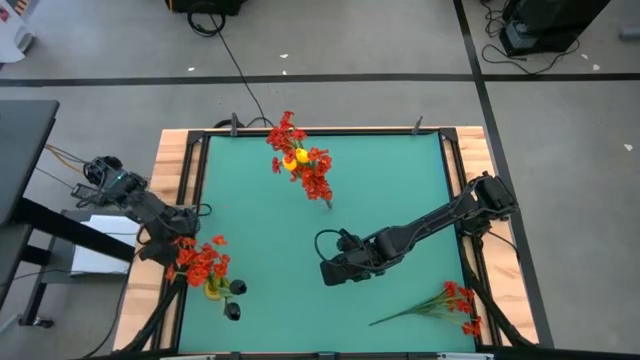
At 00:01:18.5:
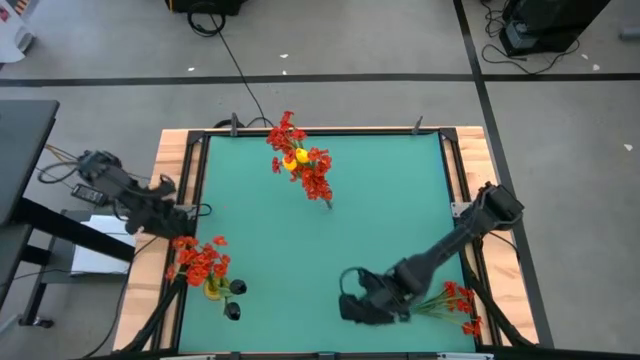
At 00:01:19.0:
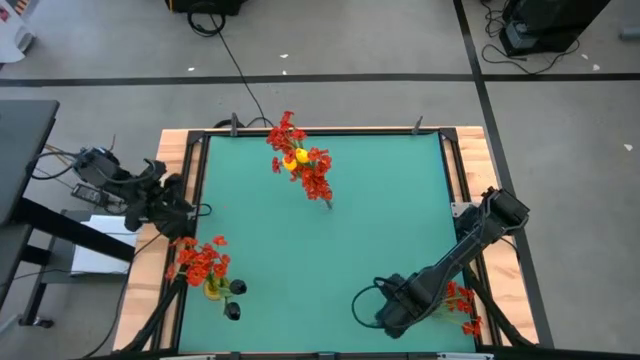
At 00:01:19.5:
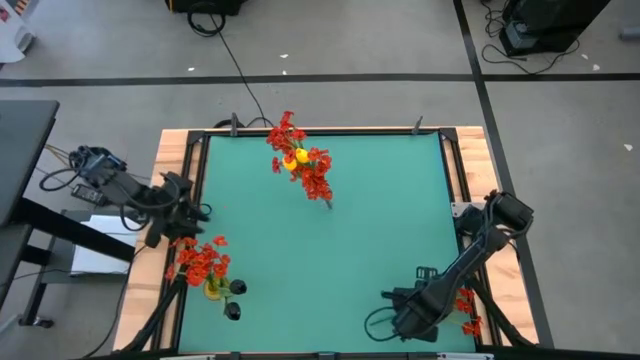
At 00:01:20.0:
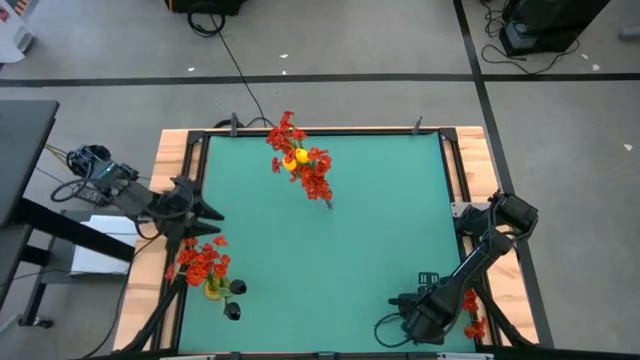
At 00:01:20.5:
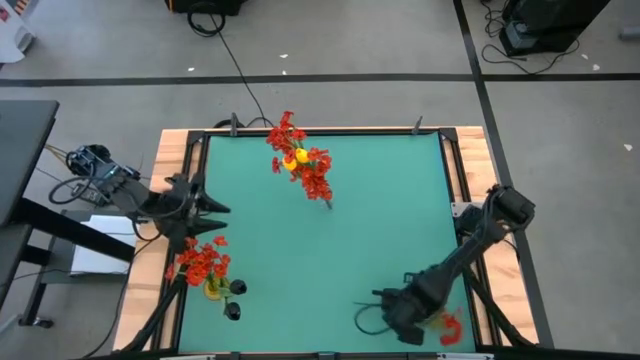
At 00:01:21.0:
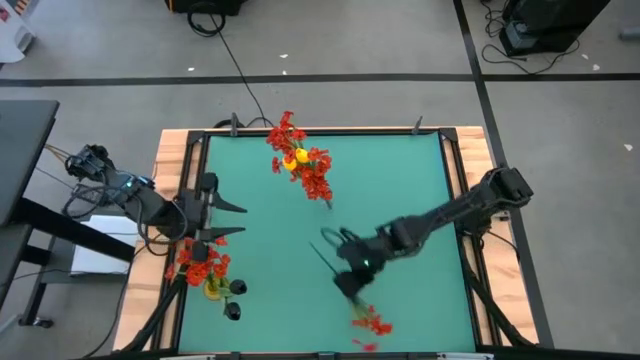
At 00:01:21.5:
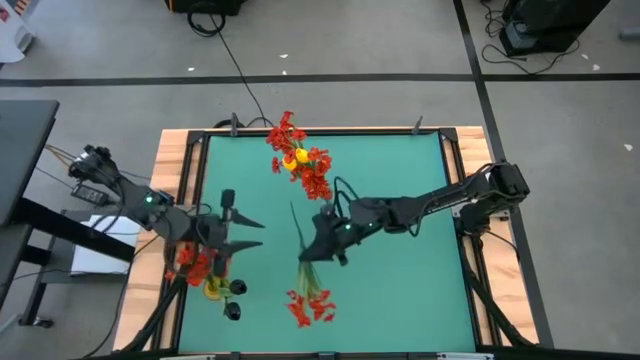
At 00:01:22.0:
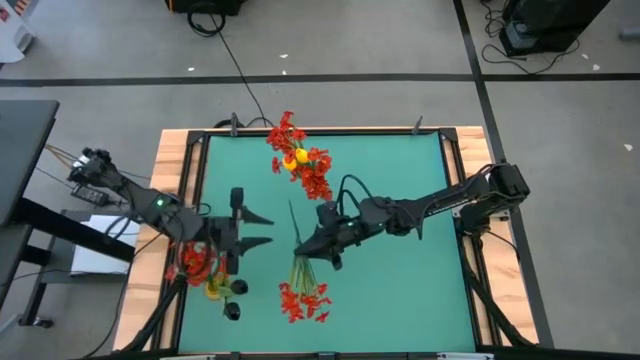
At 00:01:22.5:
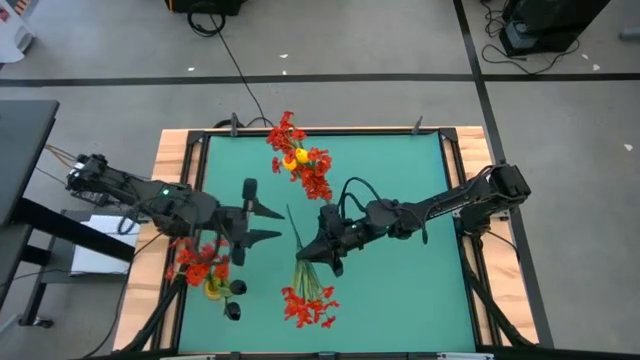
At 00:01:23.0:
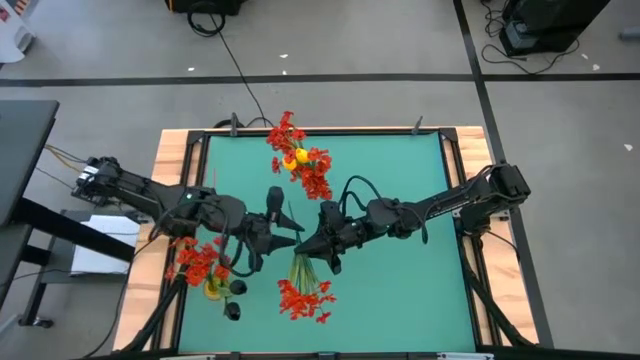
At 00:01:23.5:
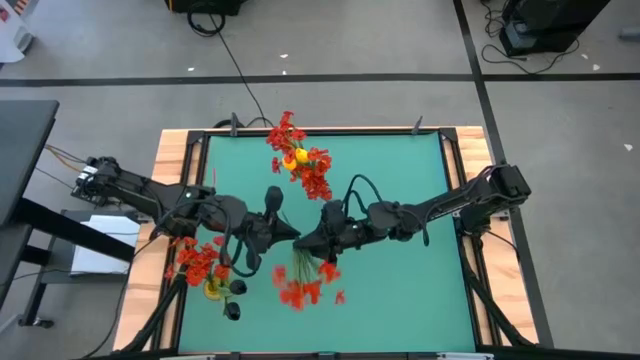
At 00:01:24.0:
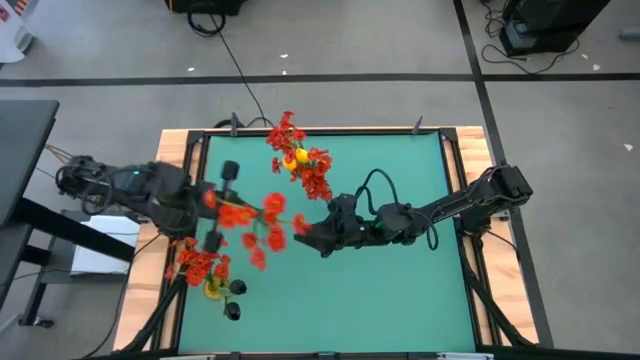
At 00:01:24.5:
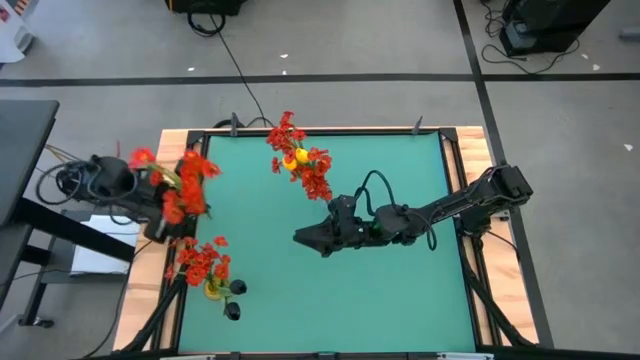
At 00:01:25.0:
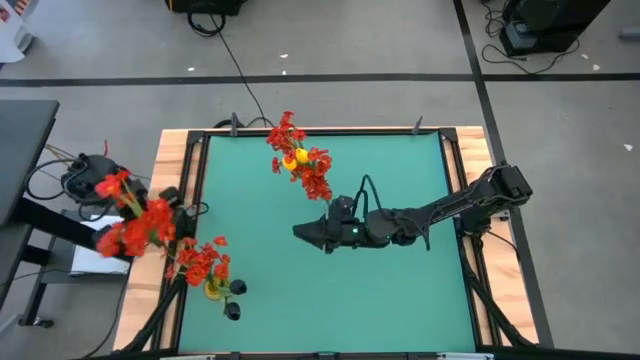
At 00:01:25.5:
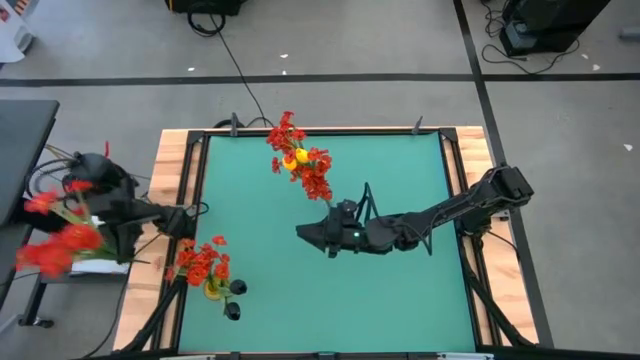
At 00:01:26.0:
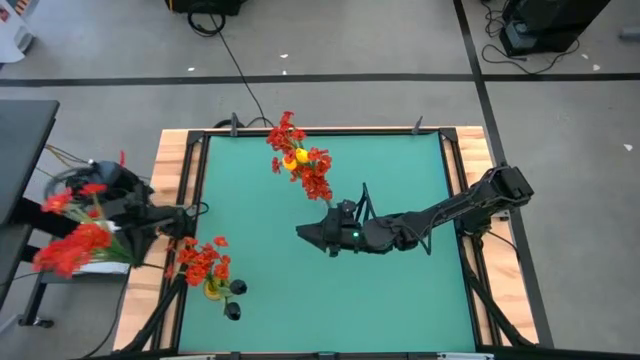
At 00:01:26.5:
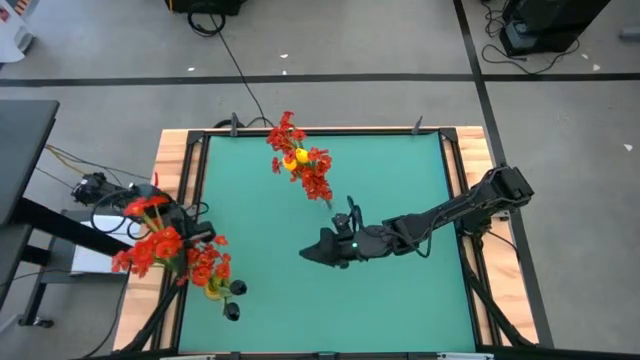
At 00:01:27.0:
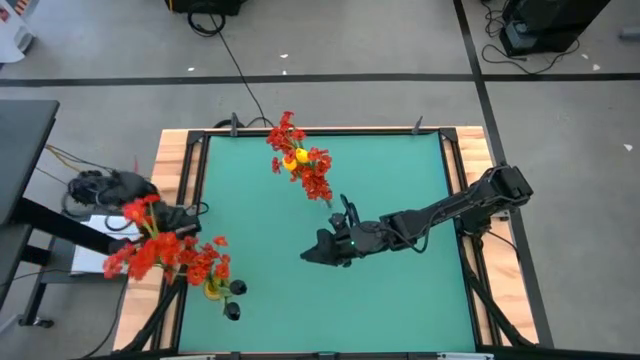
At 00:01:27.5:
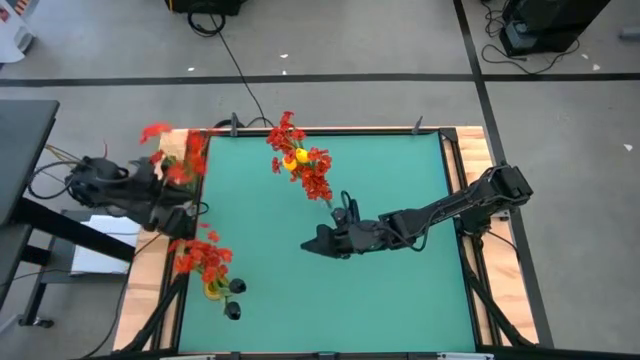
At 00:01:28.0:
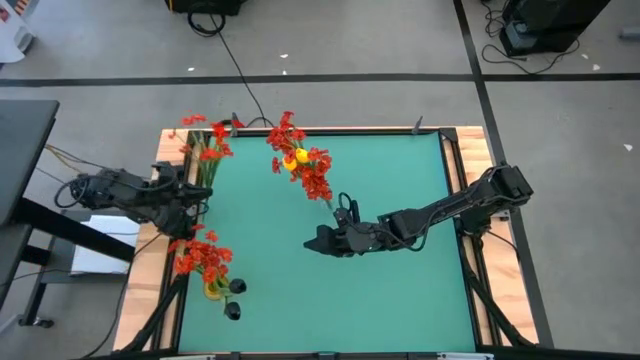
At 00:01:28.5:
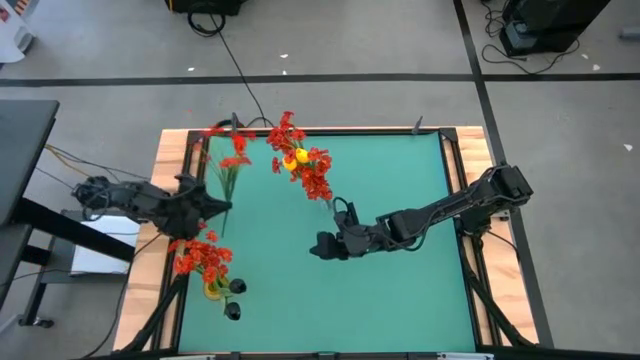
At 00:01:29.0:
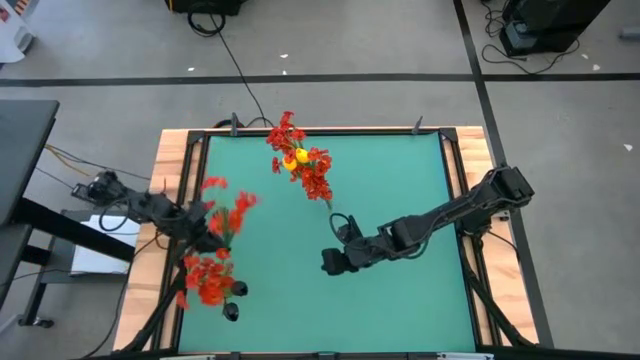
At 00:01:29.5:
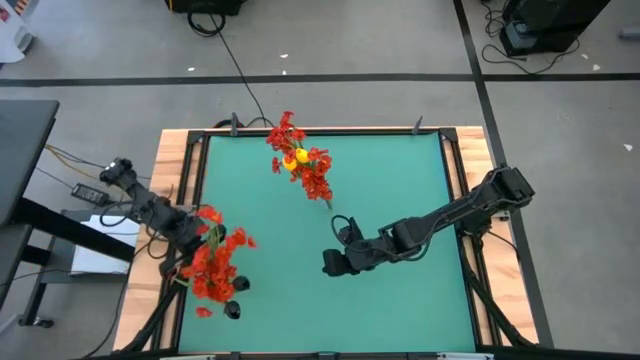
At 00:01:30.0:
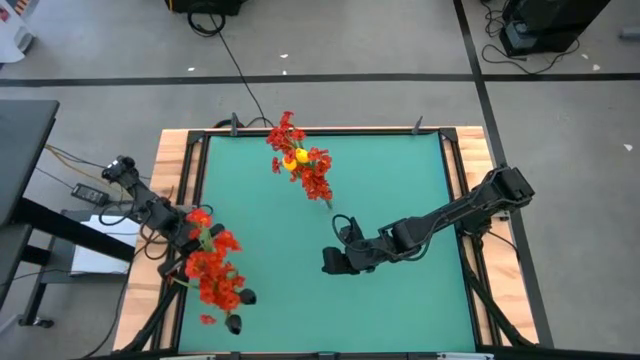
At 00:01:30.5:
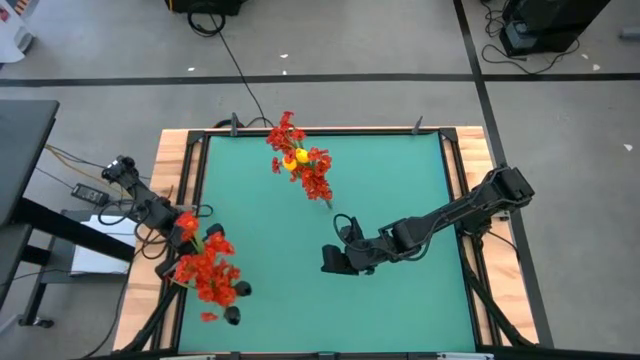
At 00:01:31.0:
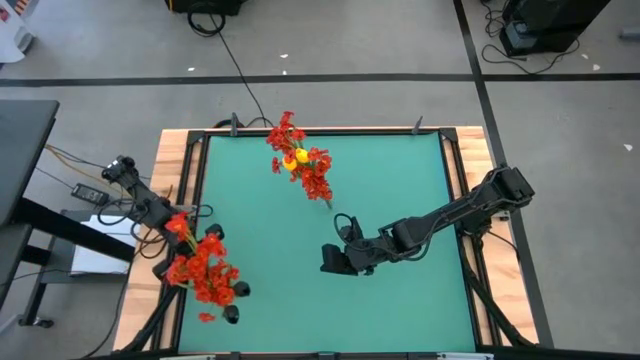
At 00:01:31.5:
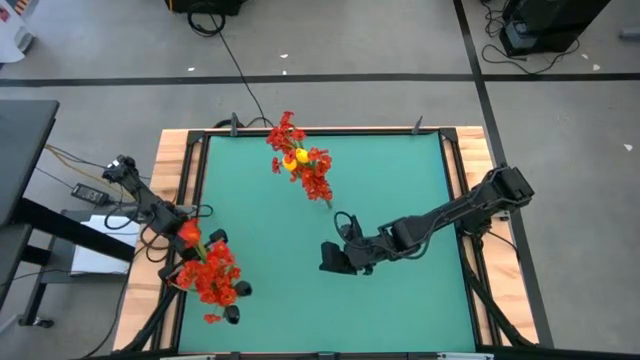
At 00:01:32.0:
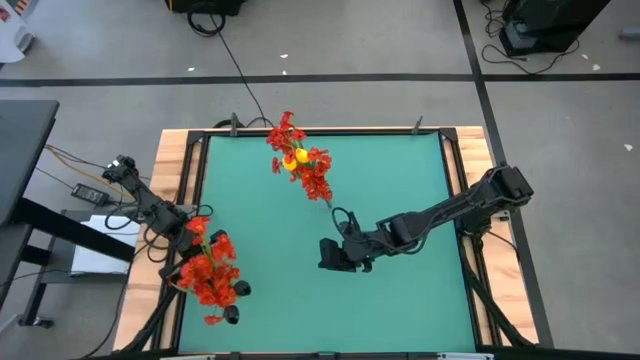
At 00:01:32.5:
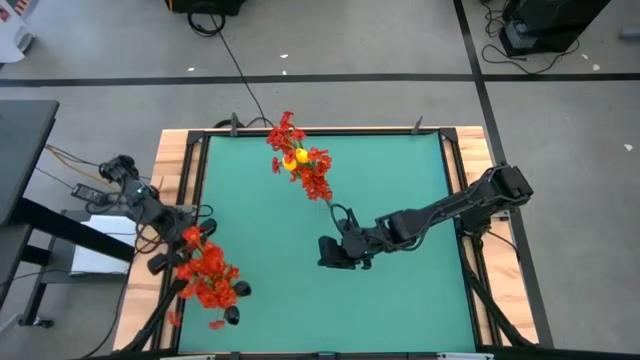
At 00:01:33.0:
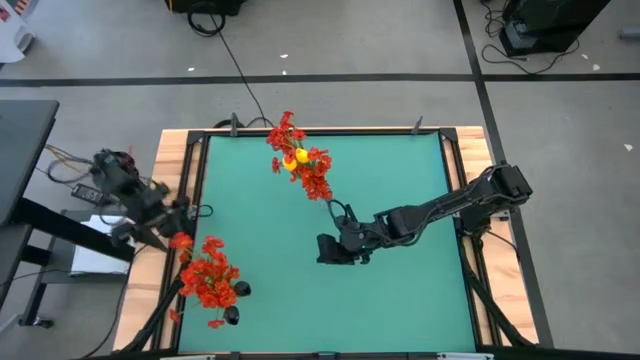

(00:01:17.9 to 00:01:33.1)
Task: Sort flowers into vase by color
Put the red flowers into the yellow vase

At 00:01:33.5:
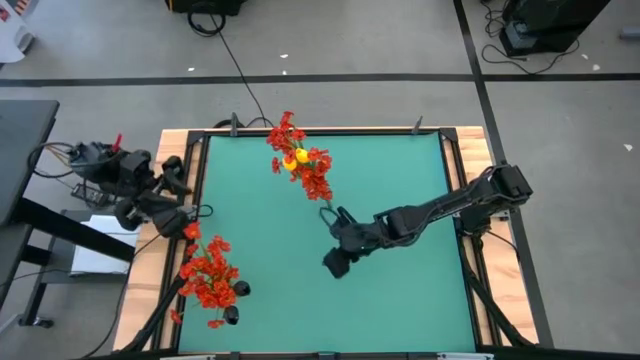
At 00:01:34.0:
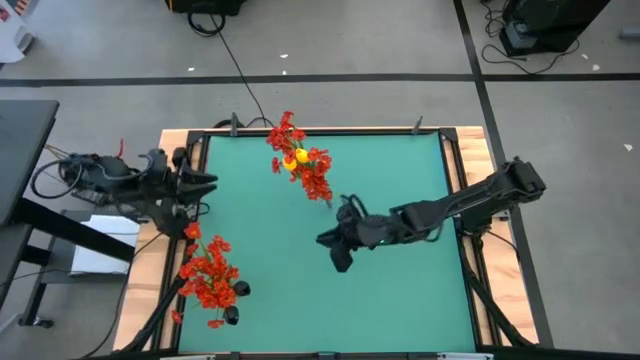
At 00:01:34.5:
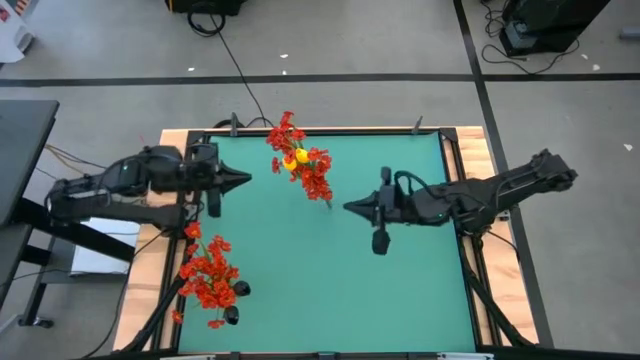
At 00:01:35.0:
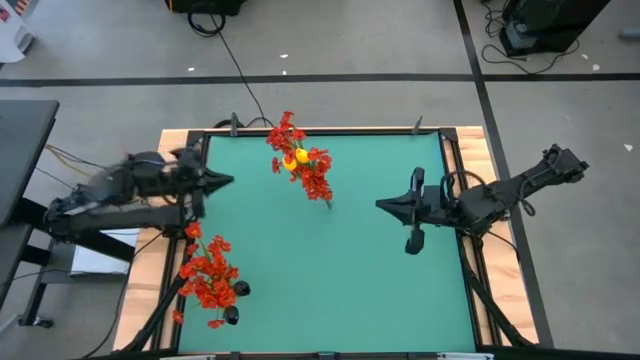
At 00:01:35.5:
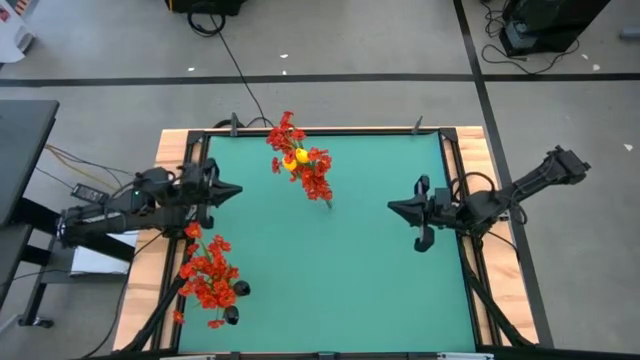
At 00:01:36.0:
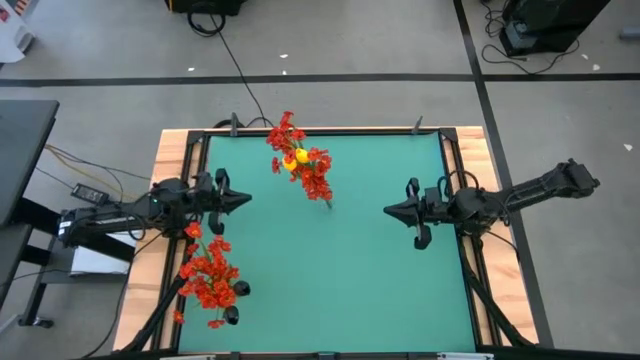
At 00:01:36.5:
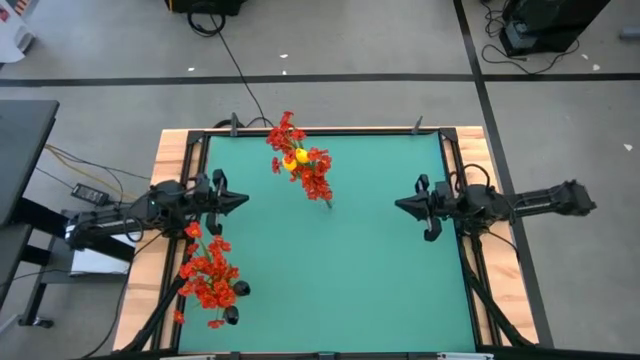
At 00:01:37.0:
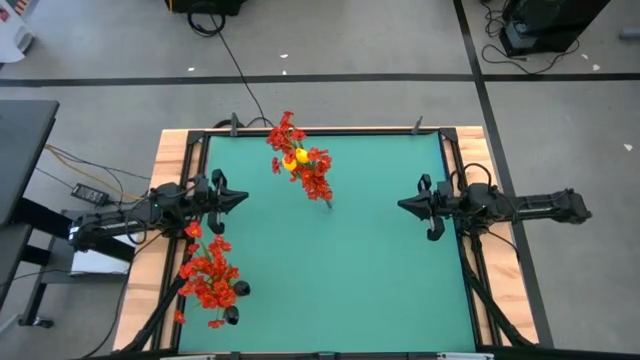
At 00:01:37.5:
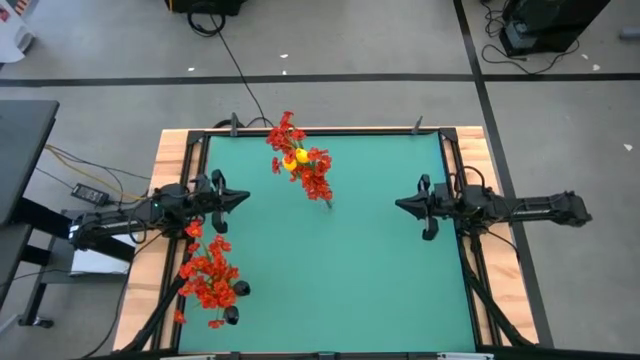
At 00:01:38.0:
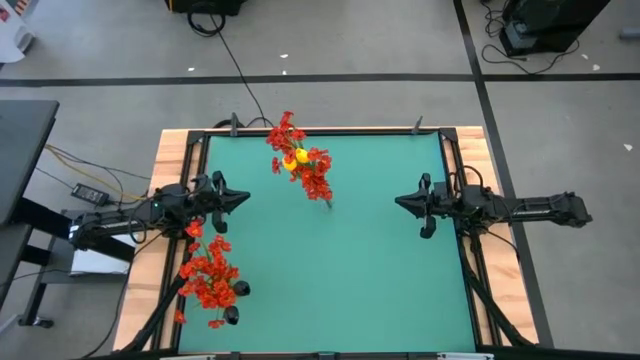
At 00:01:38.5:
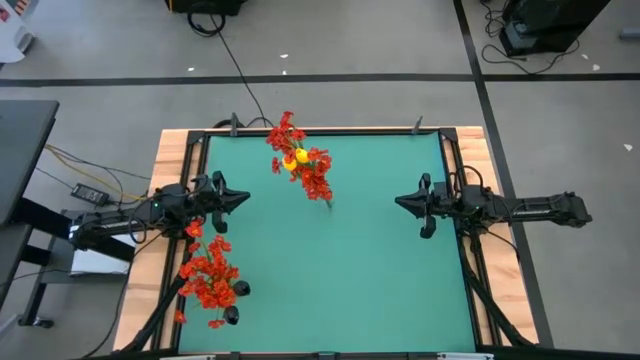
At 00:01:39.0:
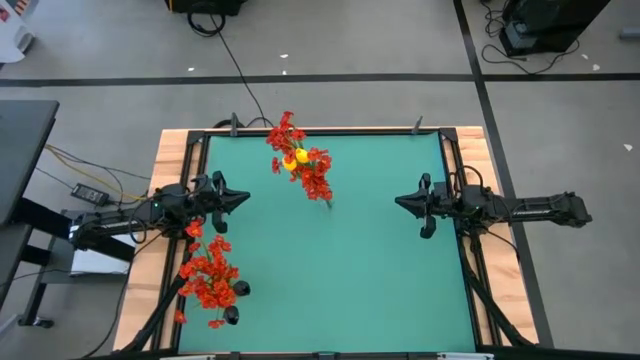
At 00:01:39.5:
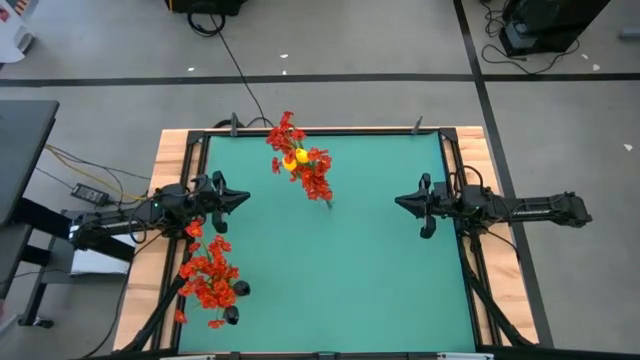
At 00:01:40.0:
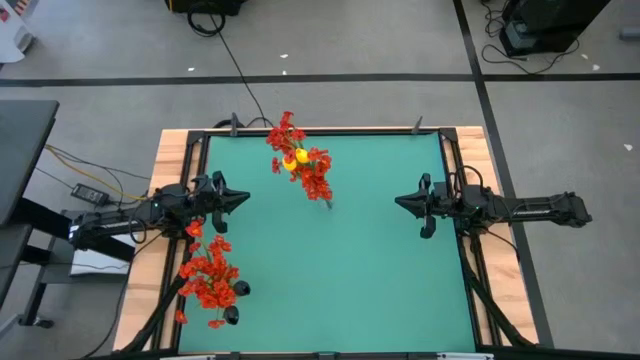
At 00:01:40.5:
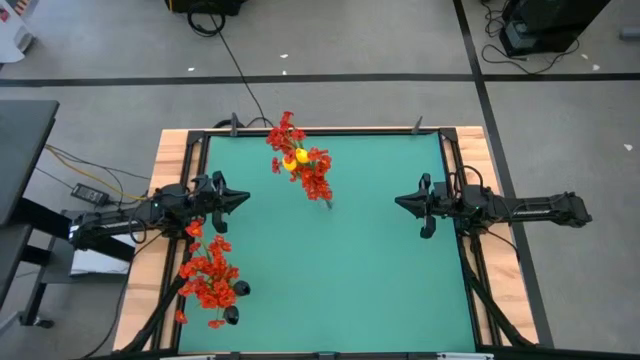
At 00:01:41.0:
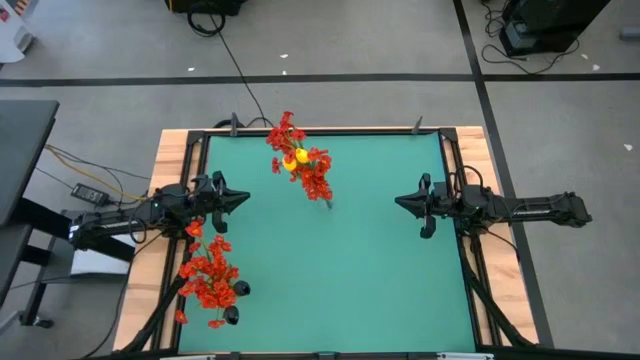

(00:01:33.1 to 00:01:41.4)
Return to Home Position
